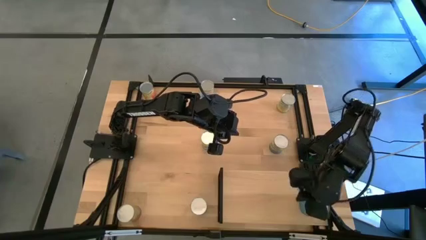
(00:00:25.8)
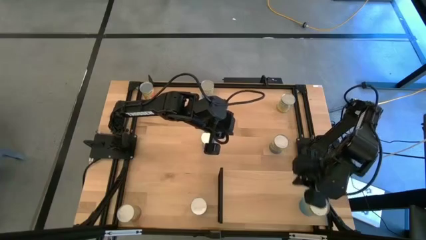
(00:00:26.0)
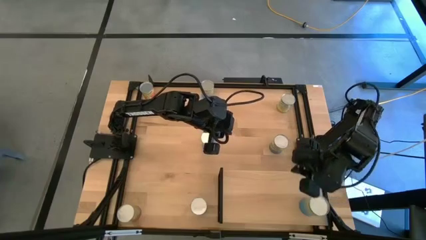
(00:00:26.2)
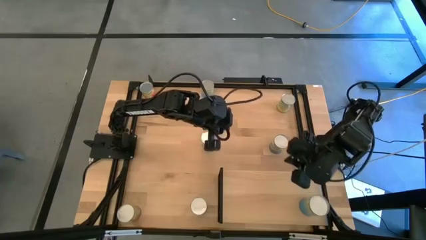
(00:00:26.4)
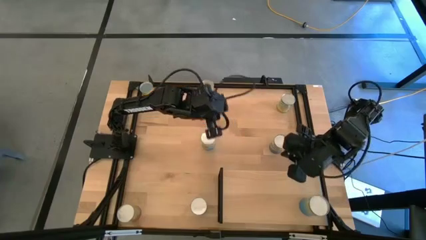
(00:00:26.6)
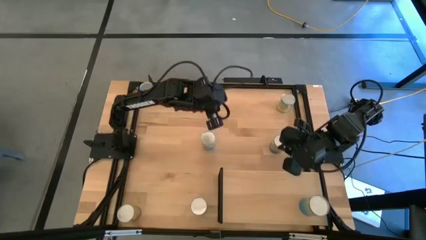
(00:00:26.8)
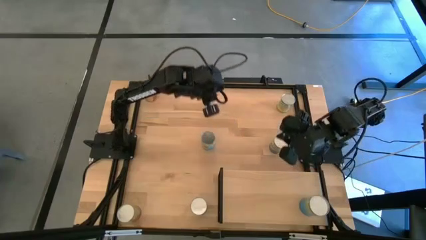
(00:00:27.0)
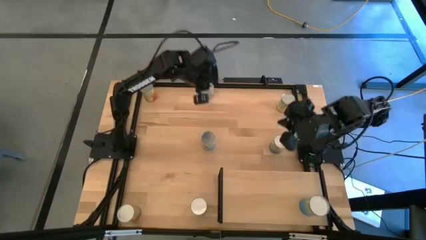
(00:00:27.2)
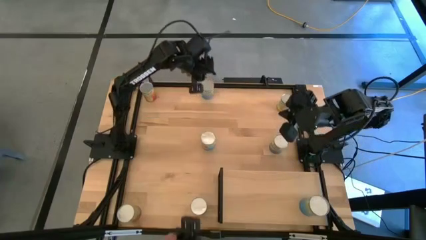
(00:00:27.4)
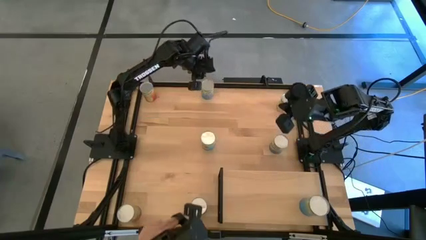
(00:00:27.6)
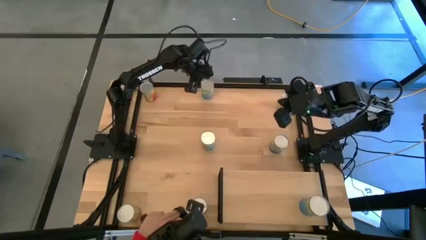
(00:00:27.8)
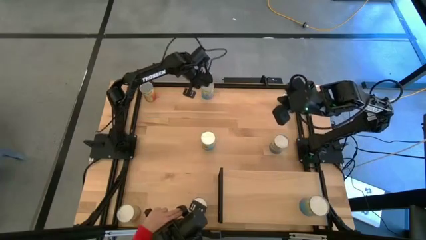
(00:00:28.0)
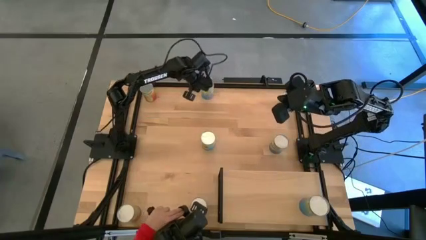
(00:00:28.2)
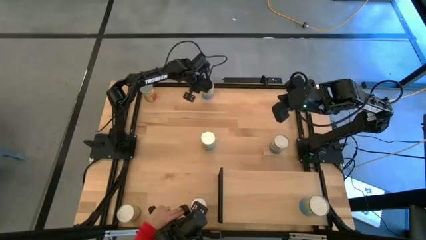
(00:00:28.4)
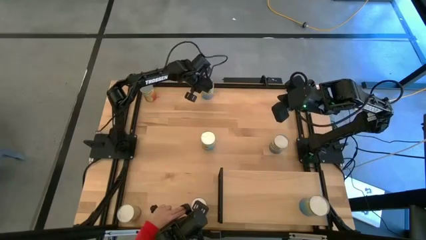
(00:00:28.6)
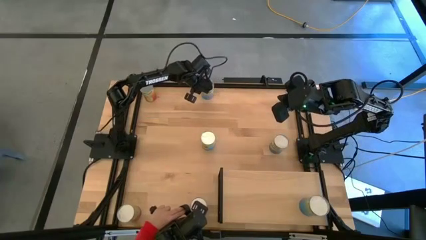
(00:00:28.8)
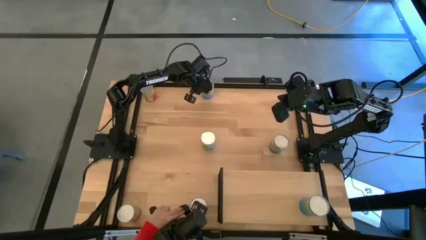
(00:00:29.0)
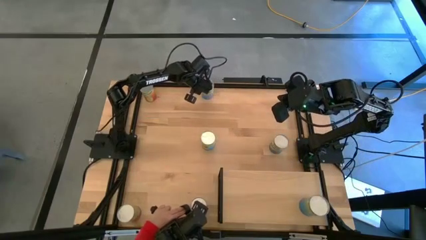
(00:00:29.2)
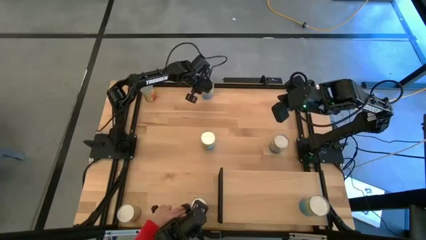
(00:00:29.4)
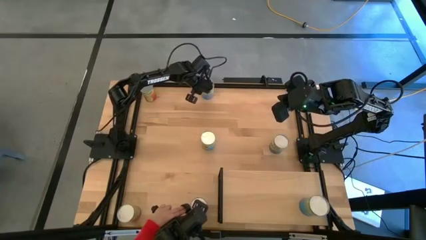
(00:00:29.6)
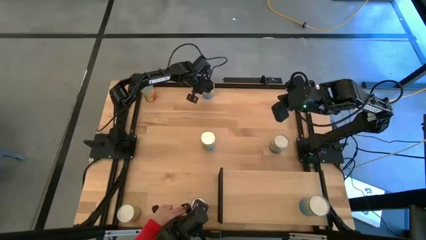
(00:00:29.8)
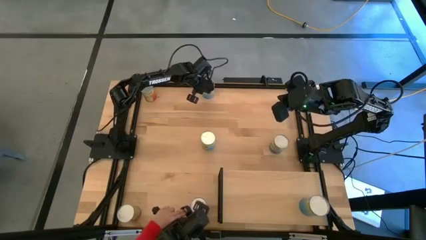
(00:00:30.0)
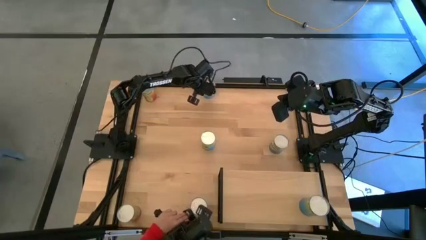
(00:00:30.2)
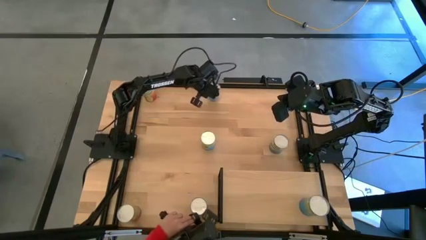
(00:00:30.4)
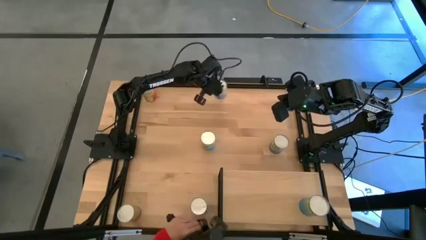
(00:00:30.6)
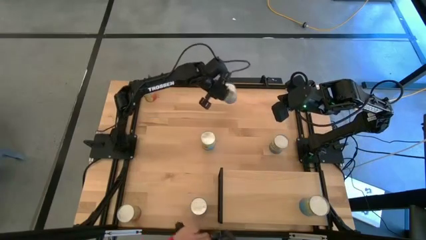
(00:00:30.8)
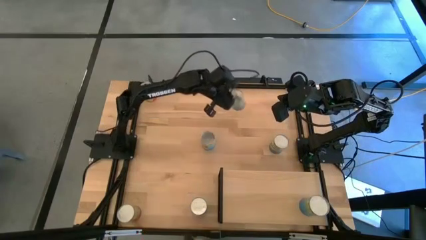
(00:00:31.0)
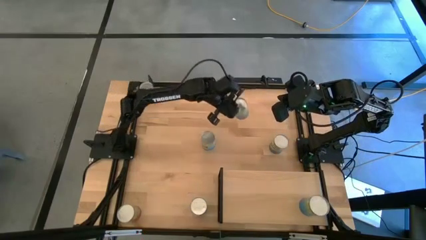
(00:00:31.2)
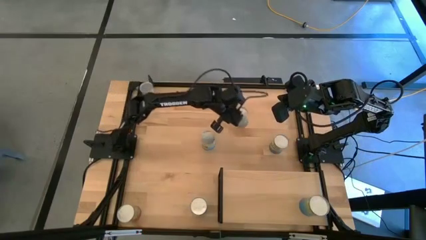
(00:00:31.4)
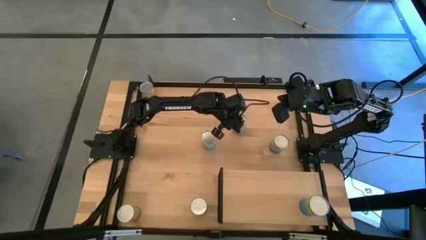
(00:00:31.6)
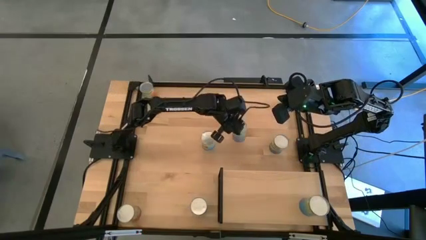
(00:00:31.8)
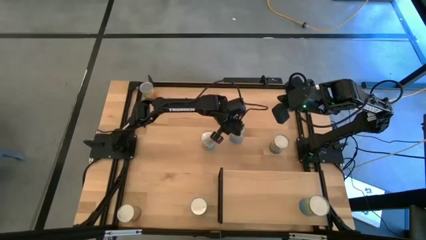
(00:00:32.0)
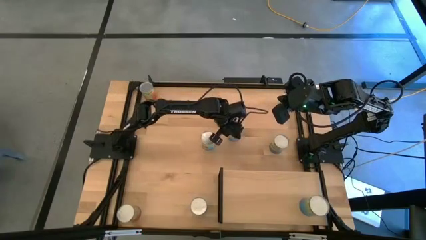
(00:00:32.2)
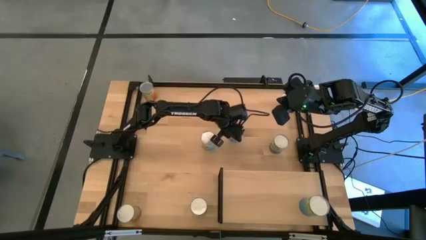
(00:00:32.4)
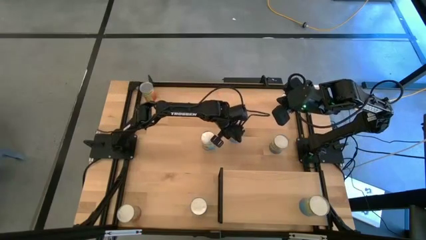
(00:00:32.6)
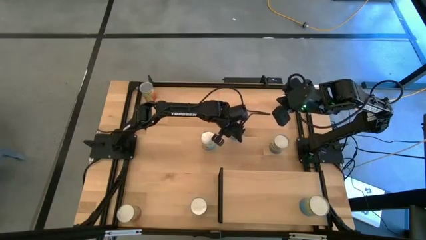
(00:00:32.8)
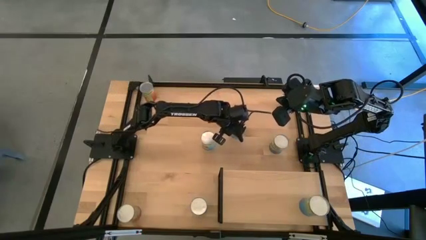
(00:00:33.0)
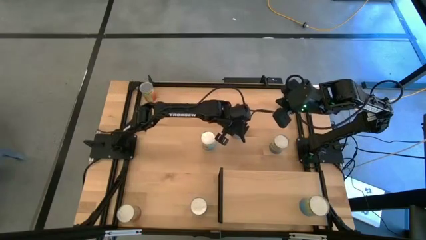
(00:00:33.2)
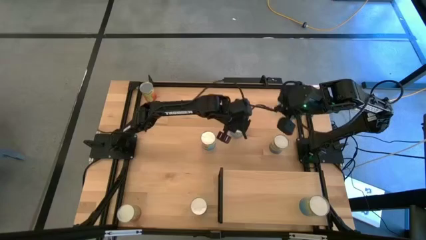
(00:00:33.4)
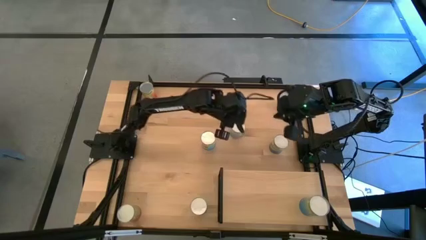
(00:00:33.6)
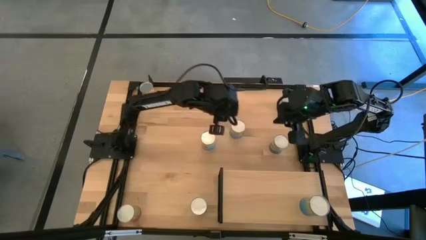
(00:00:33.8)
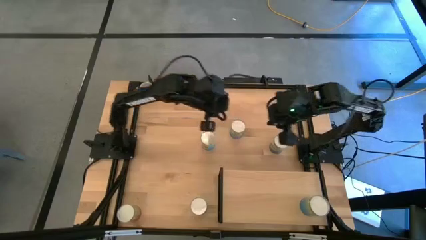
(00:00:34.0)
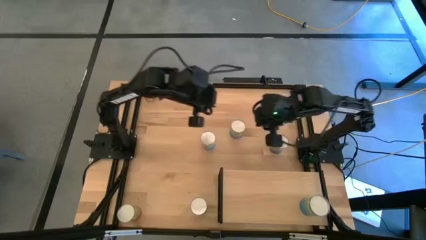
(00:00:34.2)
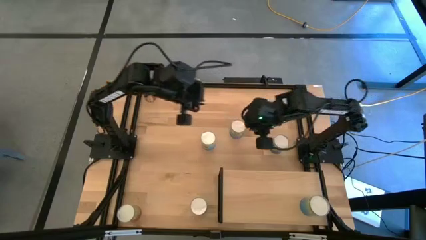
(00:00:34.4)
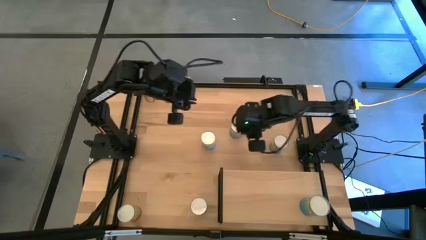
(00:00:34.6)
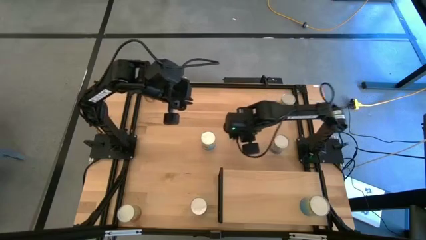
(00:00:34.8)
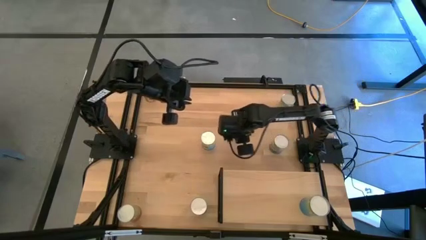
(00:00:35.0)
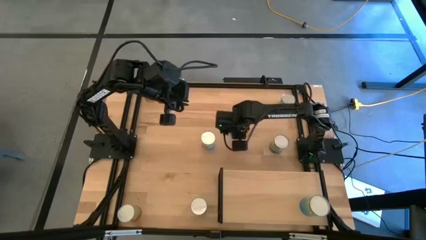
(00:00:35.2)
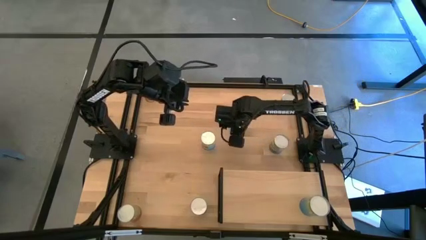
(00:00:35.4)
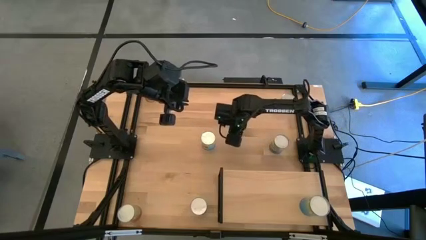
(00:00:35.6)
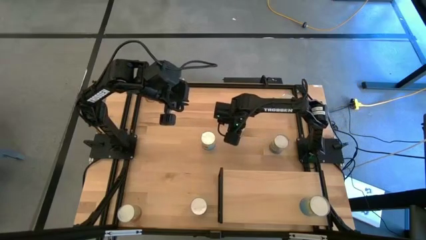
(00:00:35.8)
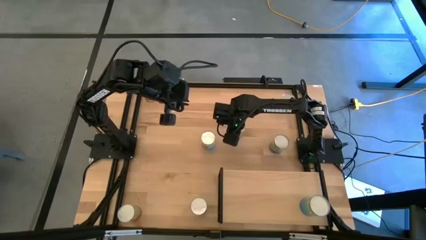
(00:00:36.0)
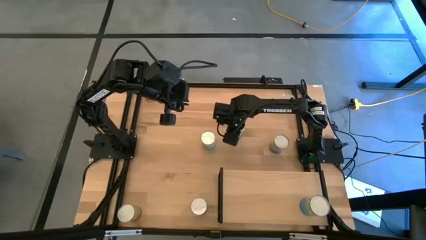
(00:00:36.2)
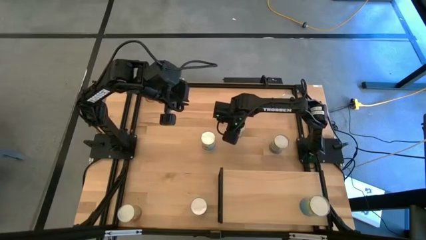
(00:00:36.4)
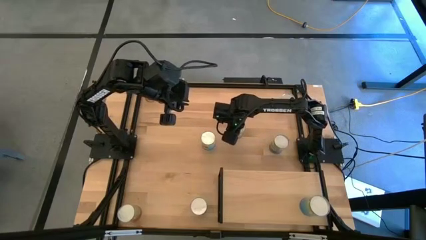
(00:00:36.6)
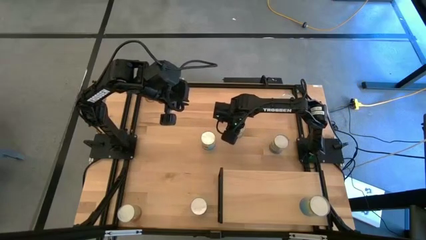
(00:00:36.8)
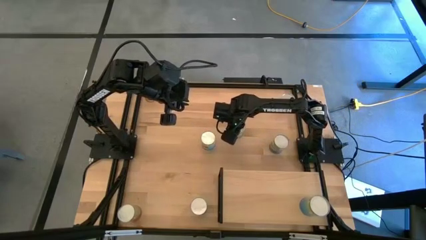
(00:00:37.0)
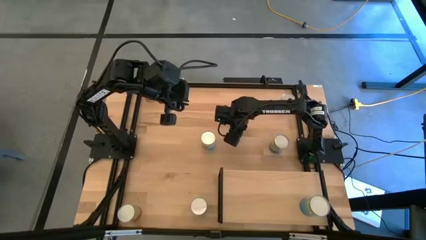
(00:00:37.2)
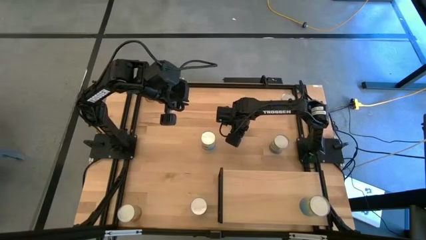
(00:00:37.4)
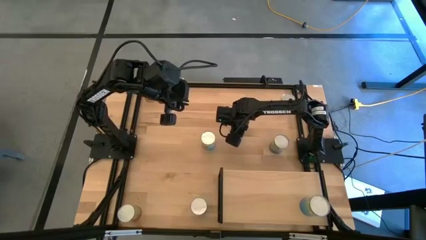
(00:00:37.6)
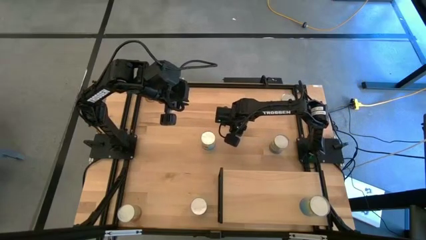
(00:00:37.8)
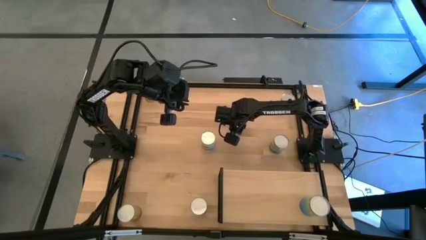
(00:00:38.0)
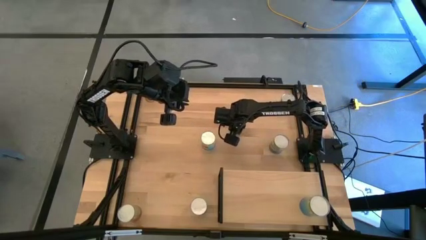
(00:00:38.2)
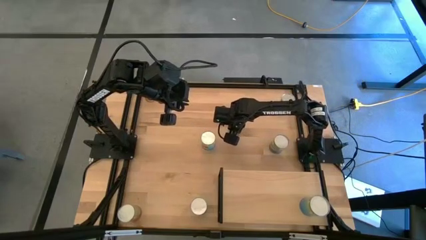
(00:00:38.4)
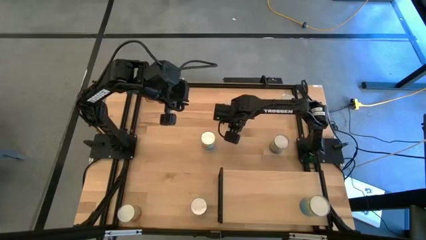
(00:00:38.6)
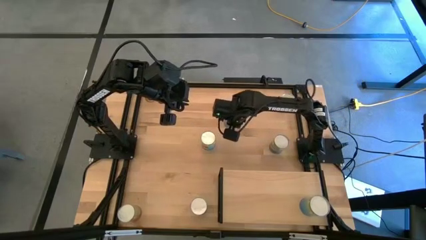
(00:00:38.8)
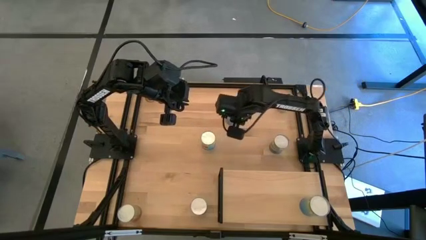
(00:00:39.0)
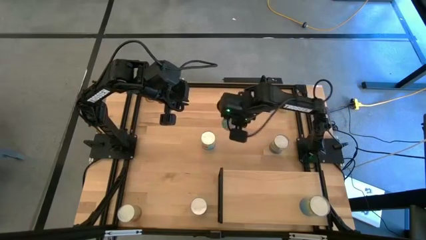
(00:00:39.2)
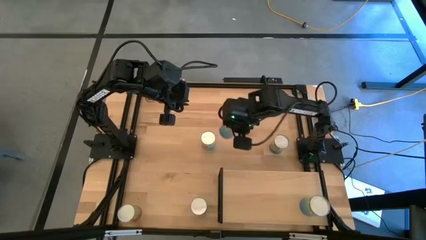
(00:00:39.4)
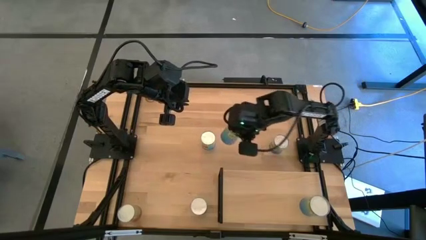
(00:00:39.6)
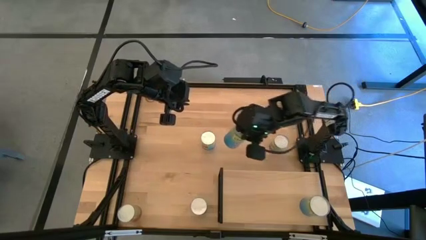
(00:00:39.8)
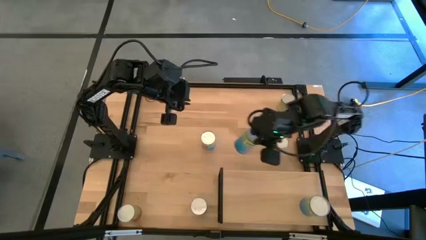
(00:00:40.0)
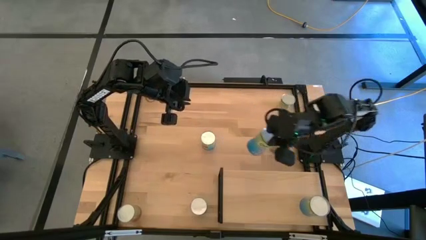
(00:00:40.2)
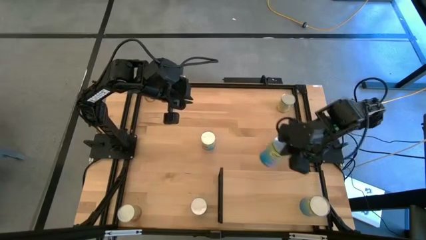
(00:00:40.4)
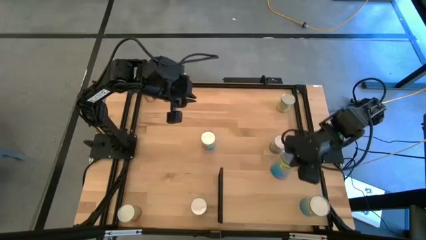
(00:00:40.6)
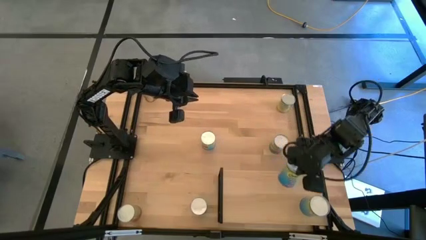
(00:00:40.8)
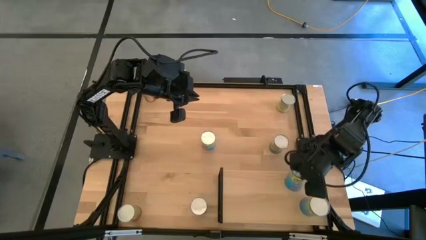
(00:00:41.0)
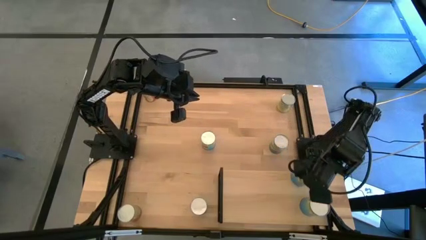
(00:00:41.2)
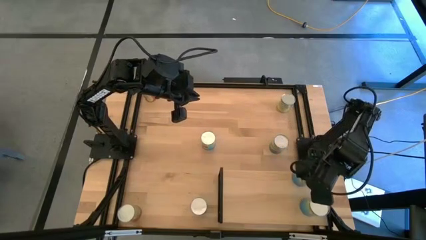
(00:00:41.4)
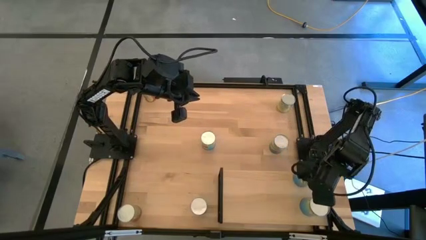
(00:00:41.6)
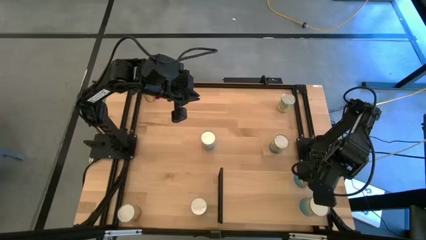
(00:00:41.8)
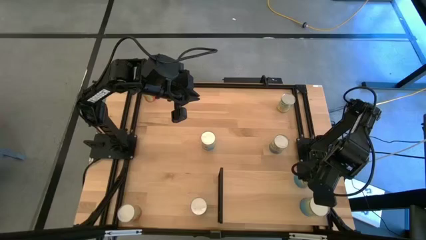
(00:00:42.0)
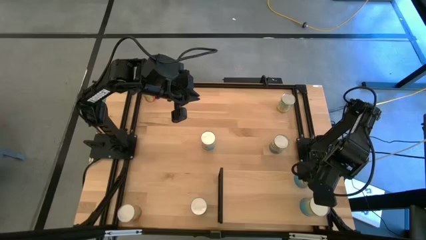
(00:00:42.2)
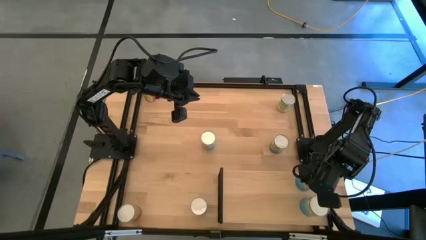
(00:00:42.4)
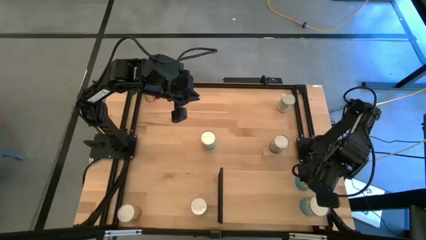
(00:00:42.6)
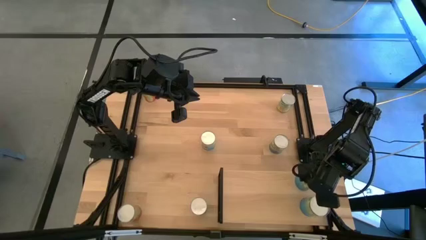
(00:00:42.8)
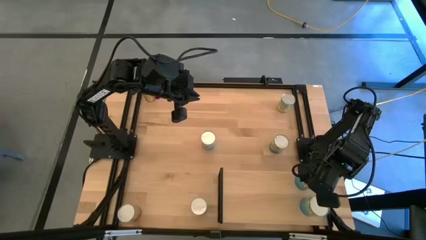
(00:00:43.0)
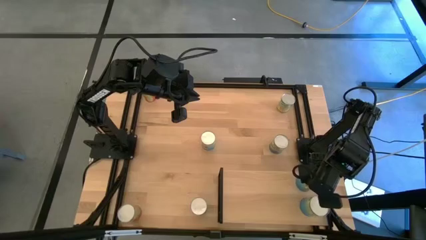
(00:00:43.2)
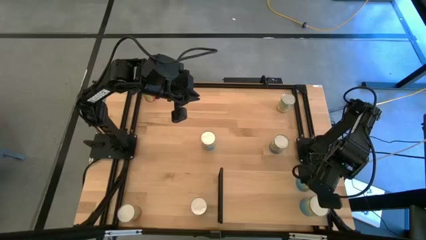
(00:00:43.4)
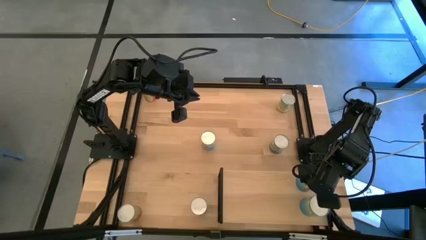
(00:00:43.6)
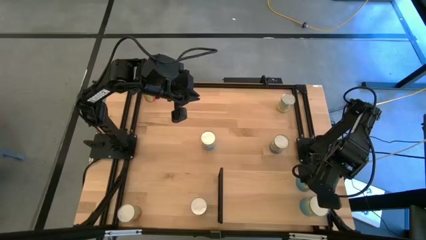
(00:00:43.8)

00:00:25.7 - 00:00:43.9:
Task: Pick and place cans onto a shelf
Put the canned cherries can on the shelf aligned with the other canned cherries
